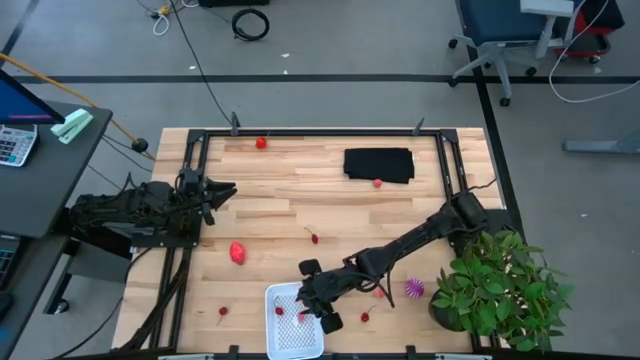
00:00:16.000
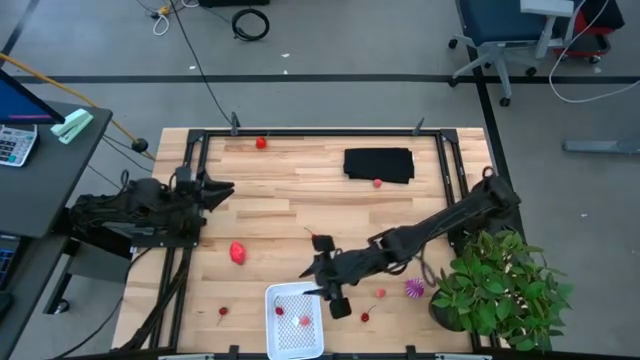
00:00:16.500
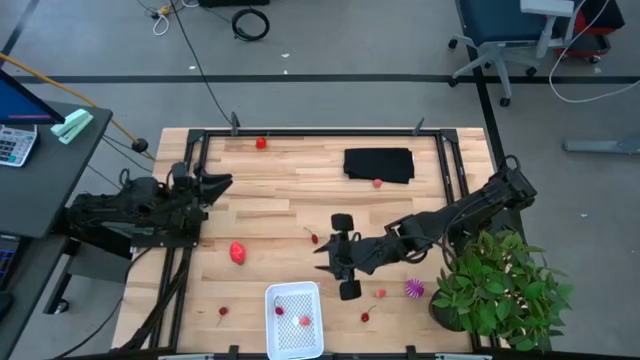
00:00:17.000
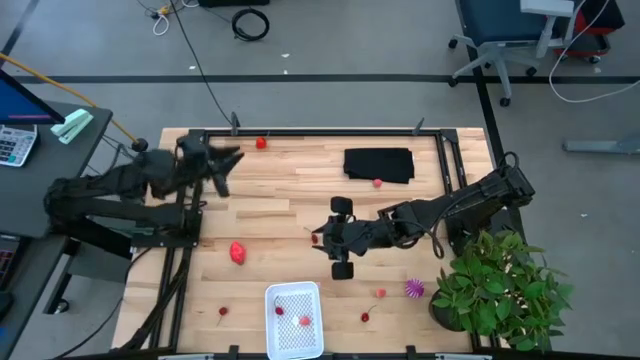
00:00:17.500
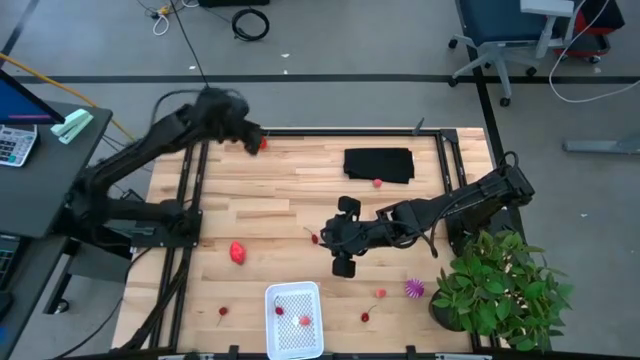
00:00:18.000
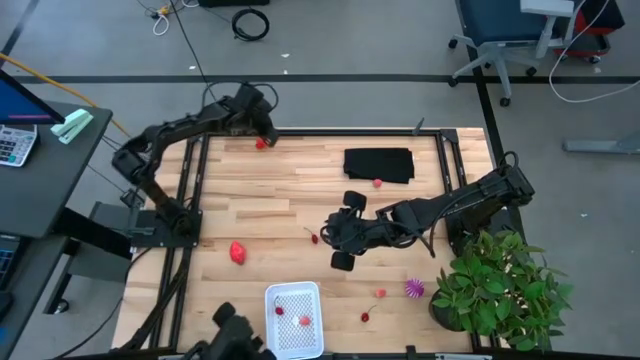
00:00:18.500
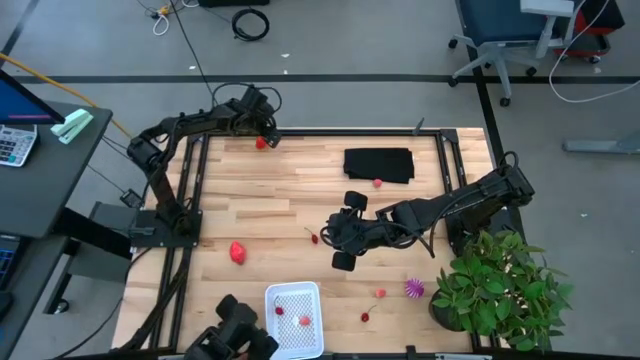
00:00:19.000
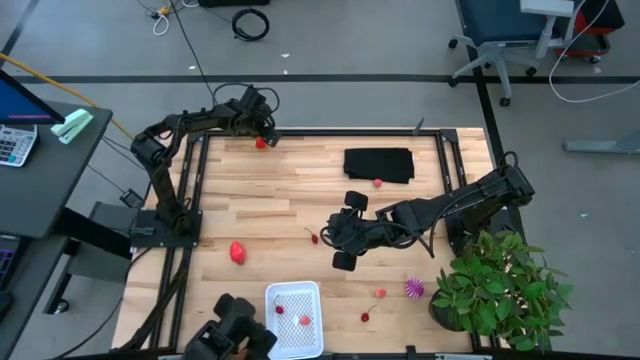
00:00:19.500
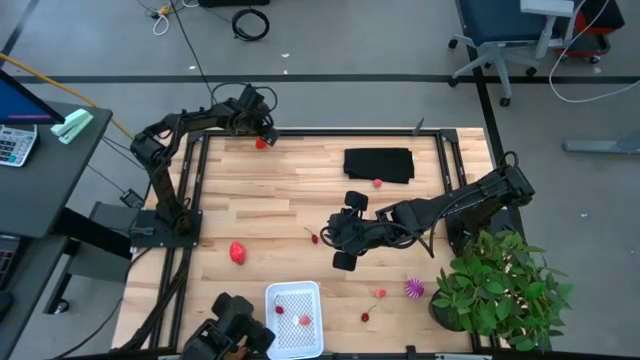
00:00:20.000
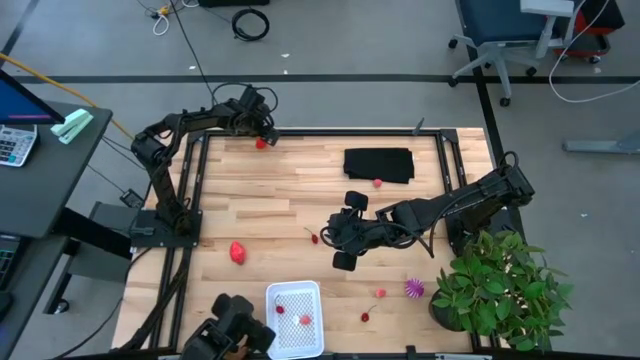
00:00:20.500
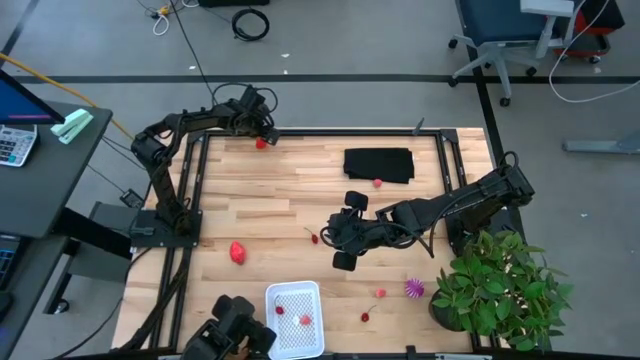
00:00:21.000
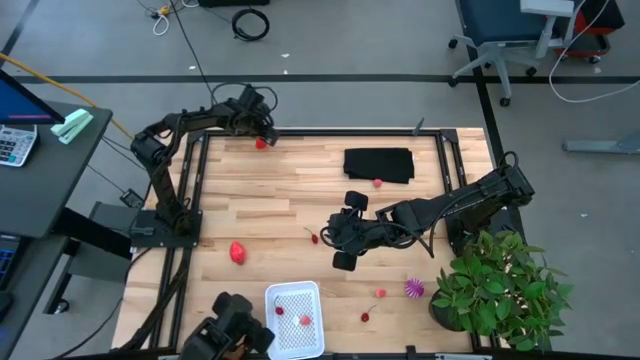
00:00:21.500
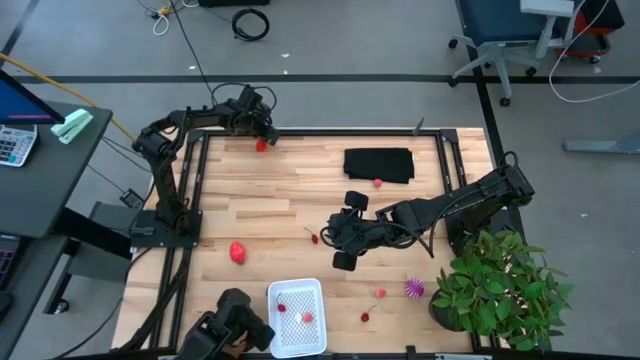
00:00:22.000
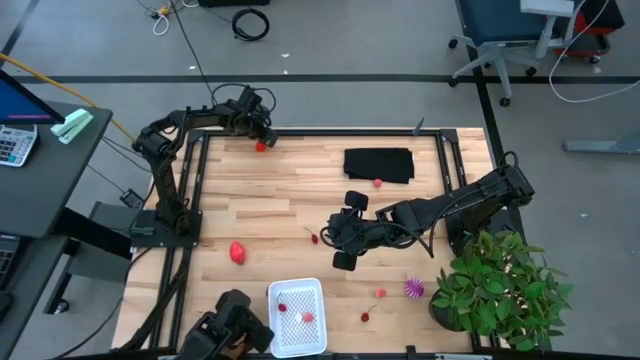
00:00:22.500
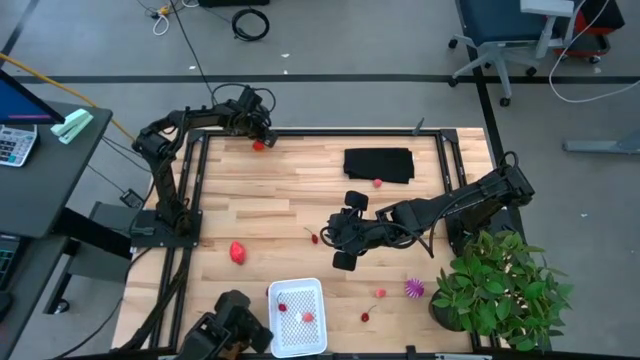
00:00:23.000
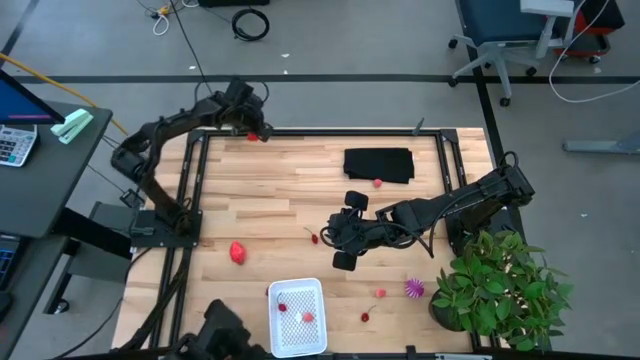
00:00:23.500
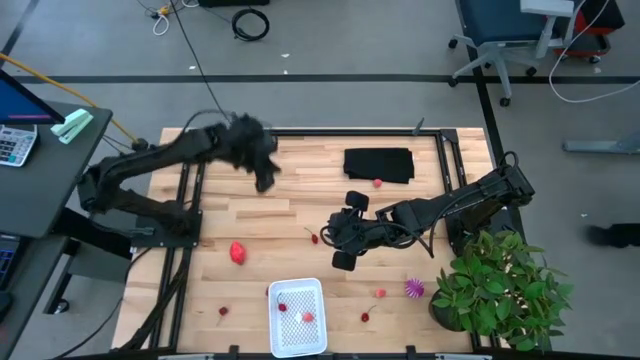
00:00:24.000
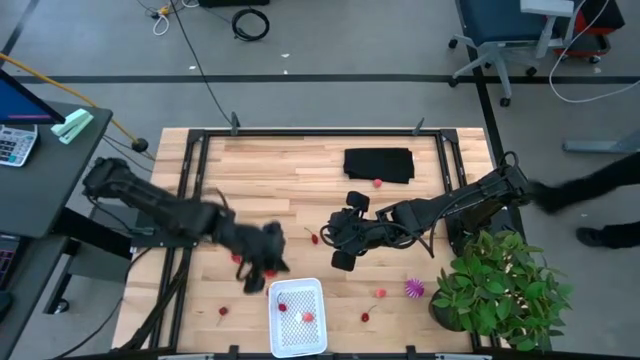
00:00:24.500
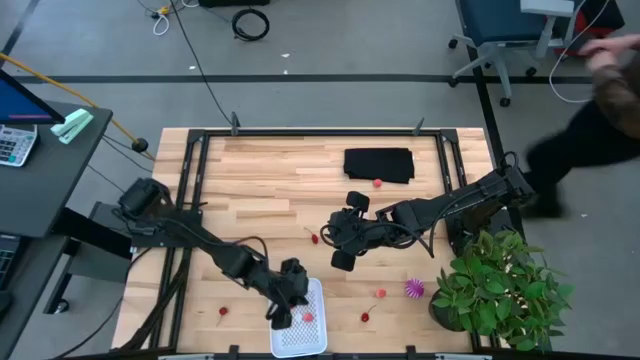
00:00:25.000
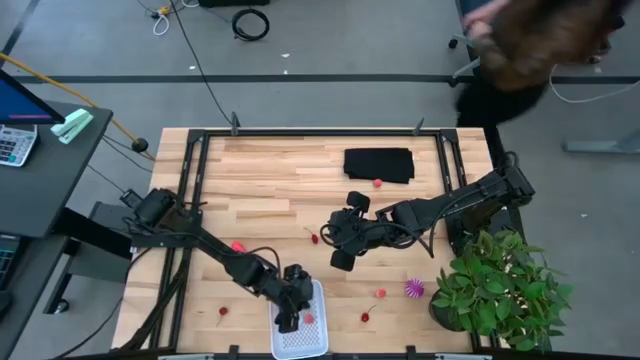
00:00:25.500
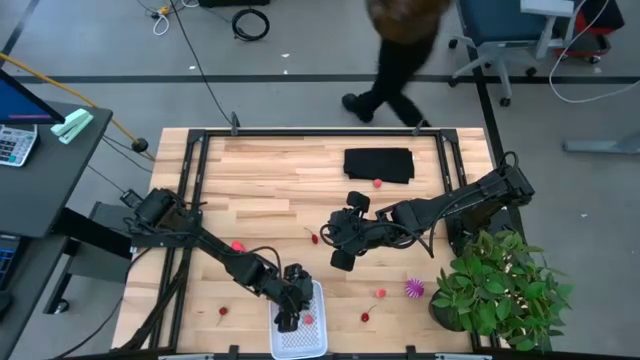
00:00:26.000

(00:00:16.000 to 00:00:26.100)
Task: Pick and placing Produce into tupperware
Put the strawberry into the white basket

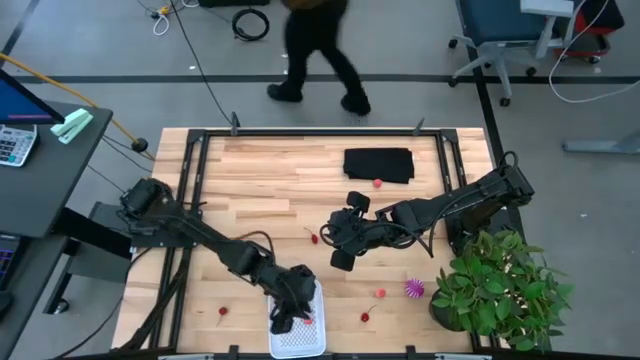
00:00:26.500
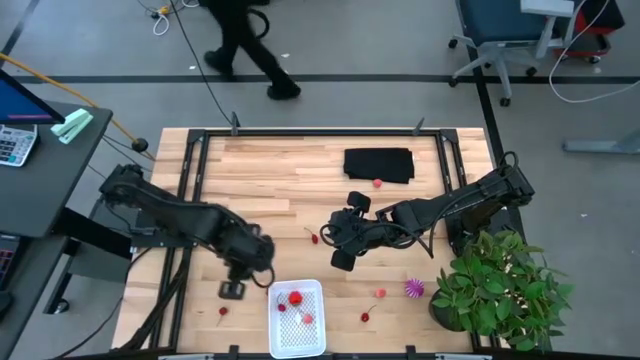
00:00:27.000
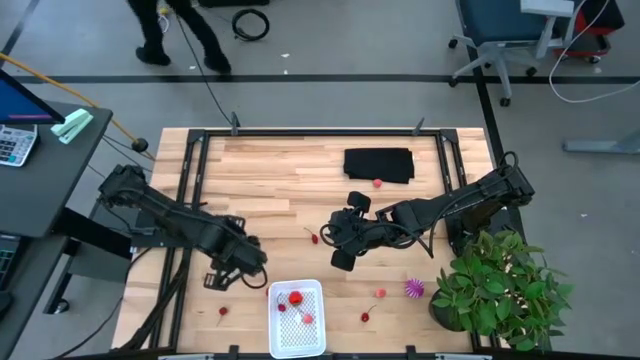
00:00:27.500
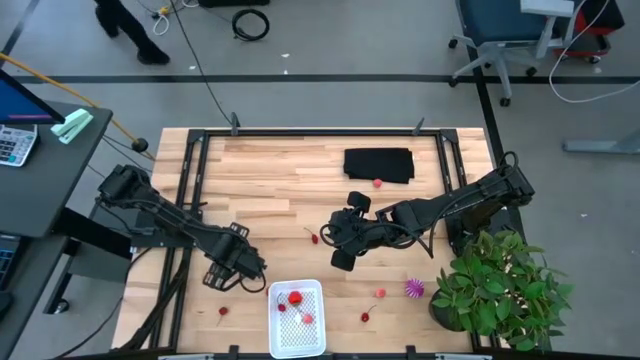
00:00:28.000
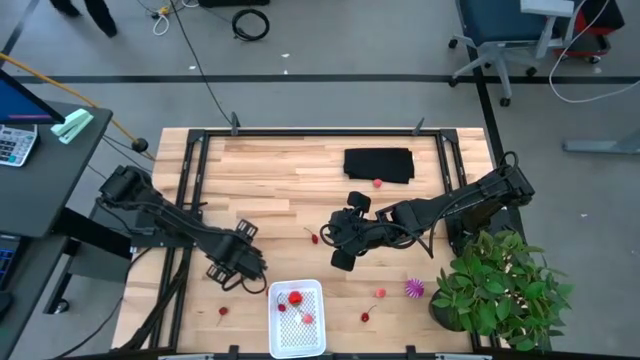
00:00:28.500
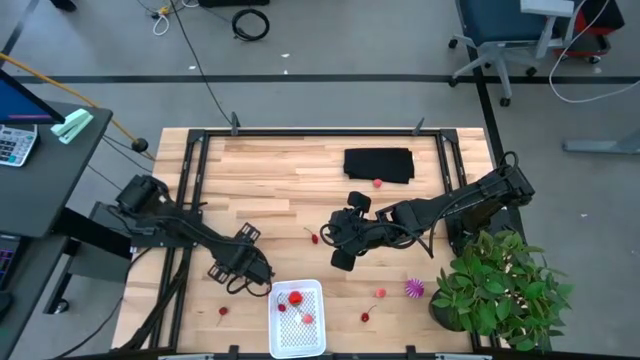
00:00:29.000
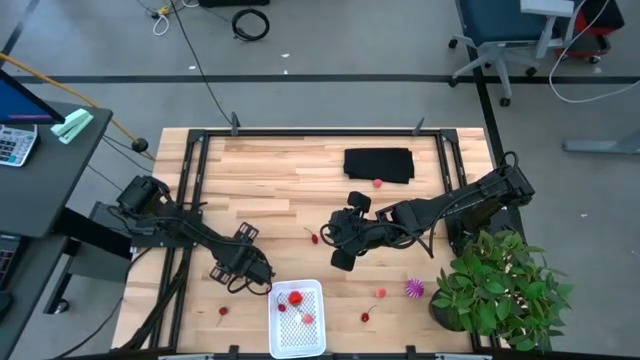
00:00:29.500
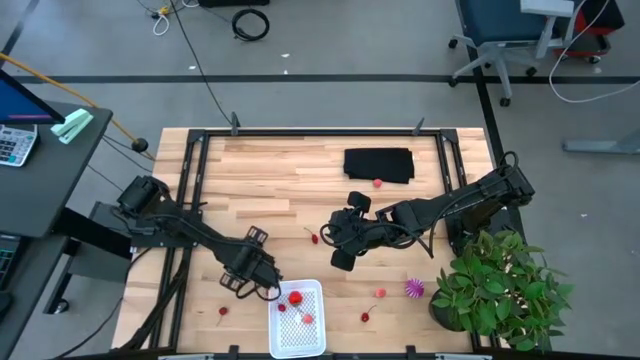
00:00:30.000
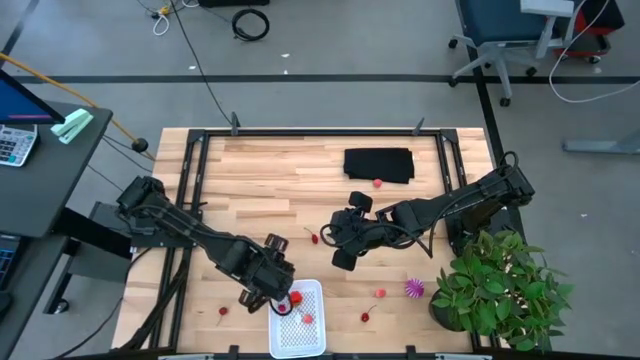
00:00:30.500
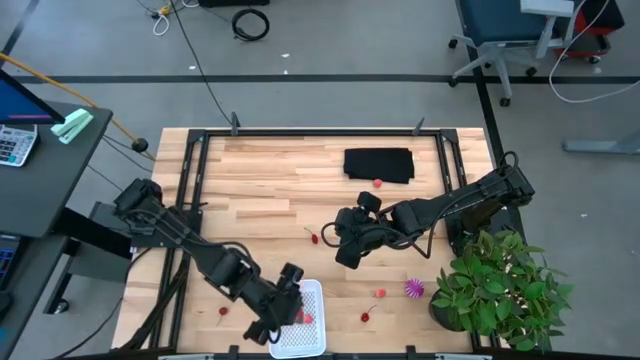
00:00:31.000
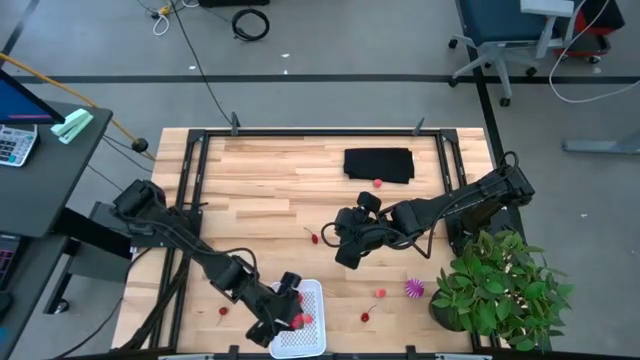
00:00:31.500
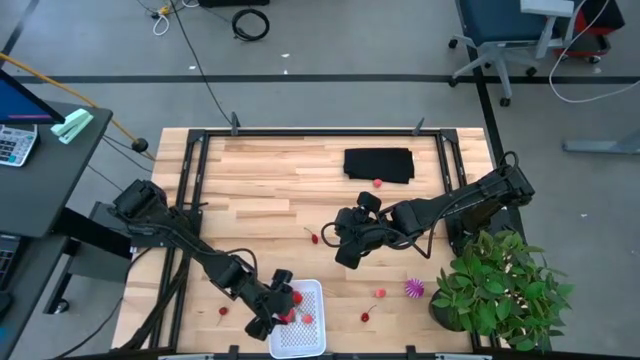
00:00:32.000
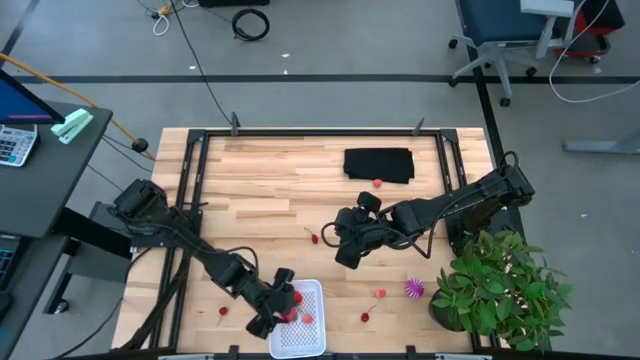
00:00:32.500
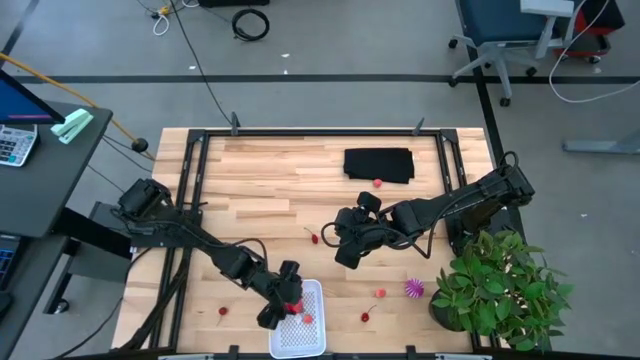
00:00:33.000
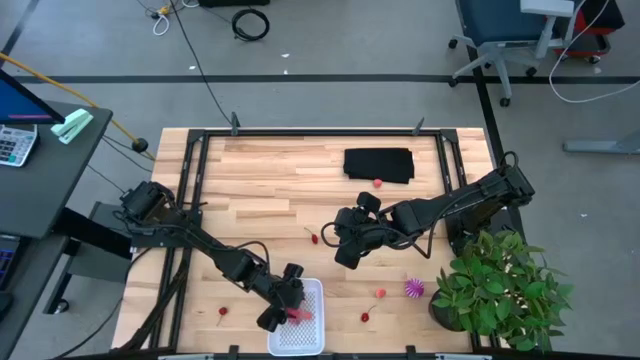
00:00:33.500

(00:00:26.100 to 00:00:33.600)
Put the dragon fruit into the white basket

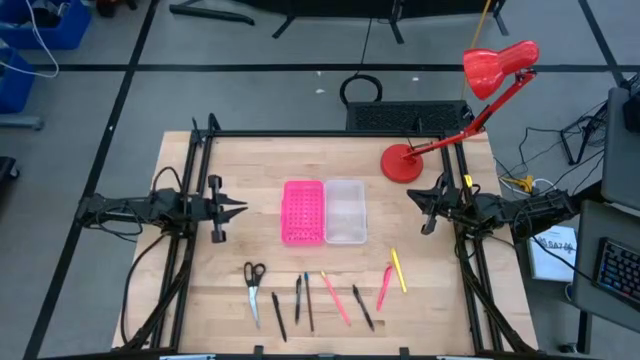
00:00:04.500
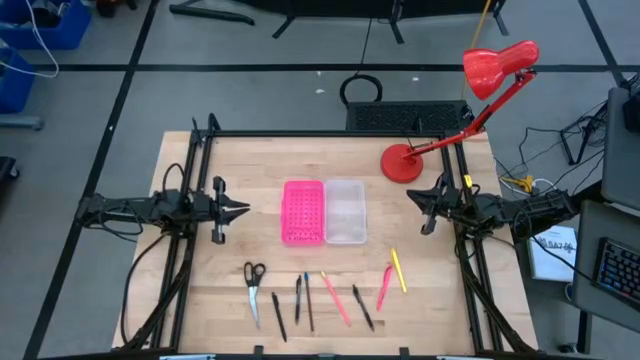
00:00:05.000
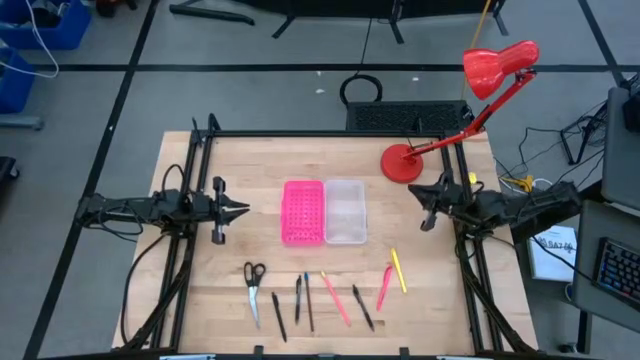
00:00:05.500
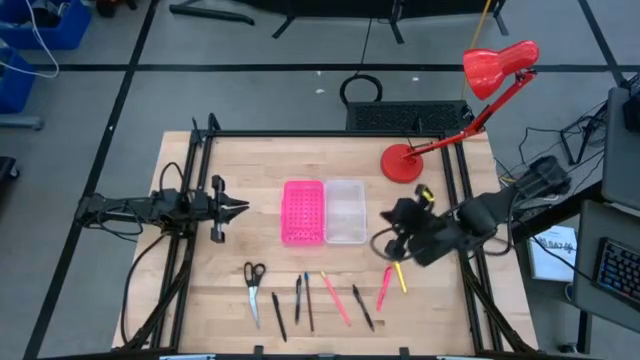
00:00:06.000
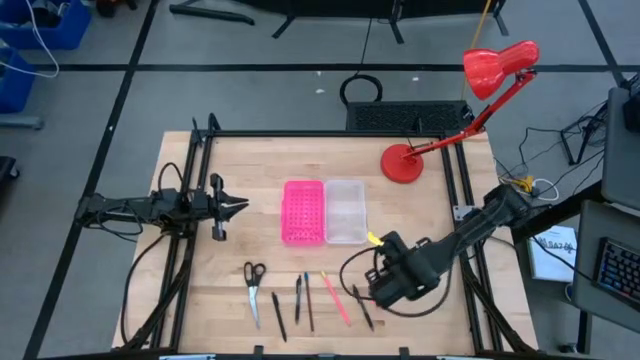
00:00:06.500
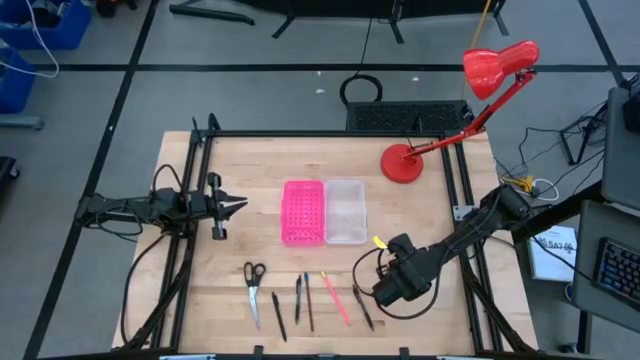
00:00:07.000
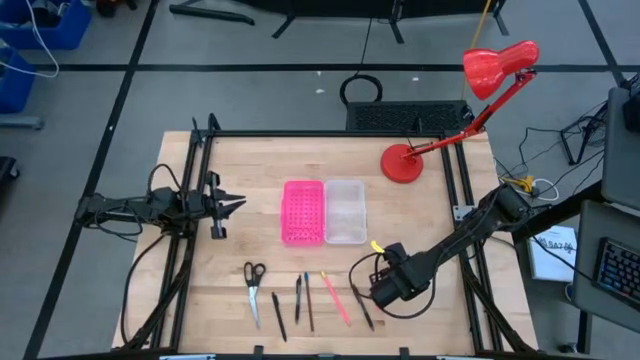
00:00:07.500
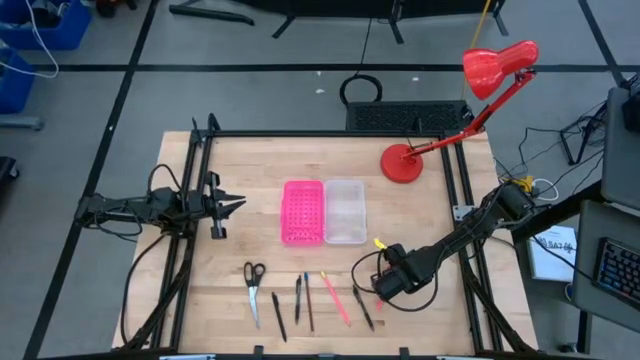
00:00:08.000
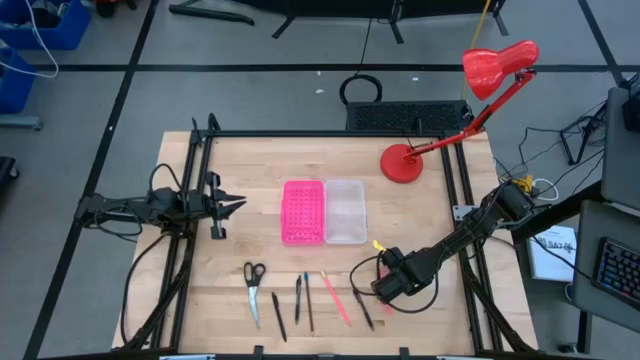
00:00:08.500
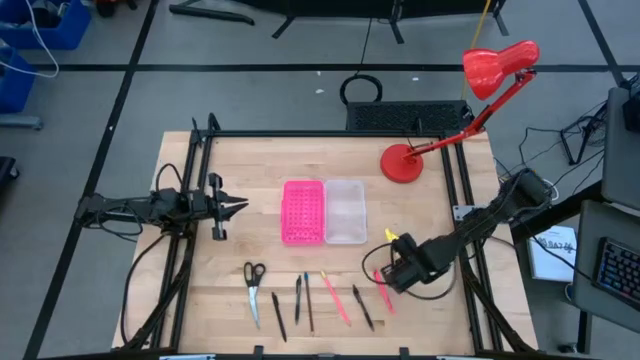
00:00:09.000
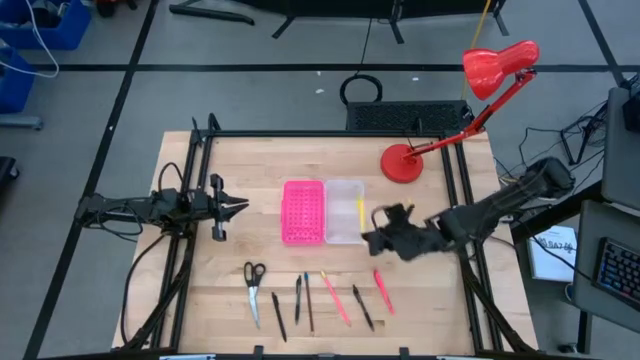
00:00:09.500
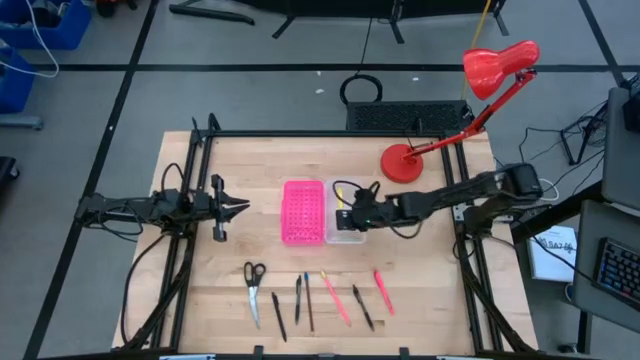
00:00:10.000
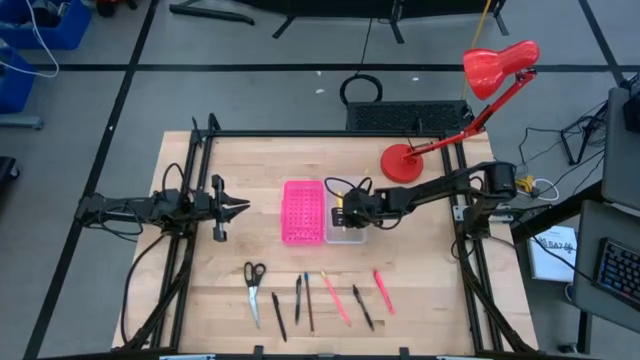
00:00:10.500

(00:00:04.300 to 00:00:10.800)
Task: Pick & place school supplies into a supply box
Put the yellow pen into the supply box
